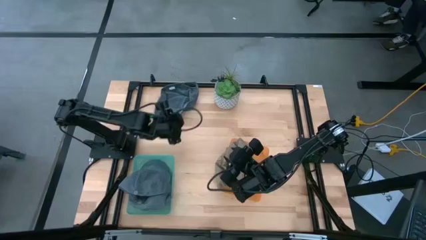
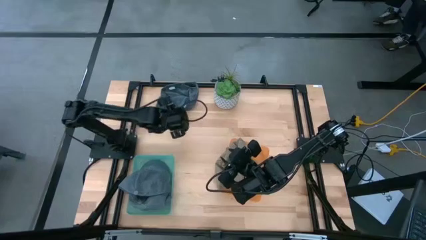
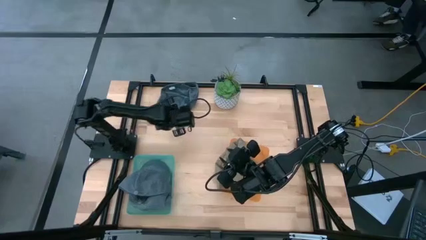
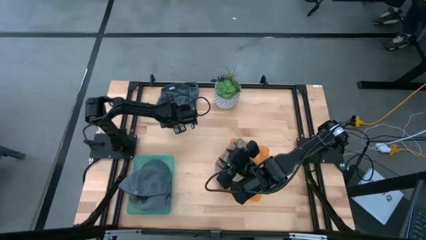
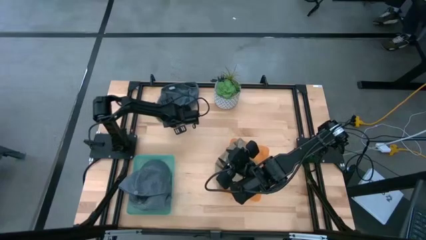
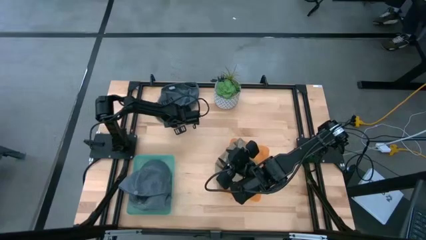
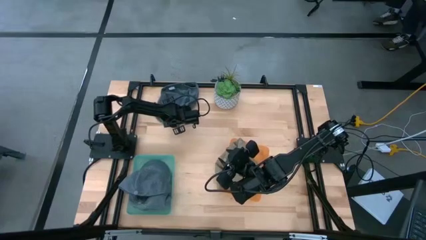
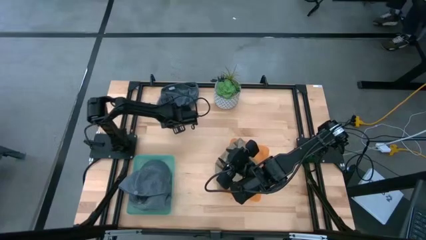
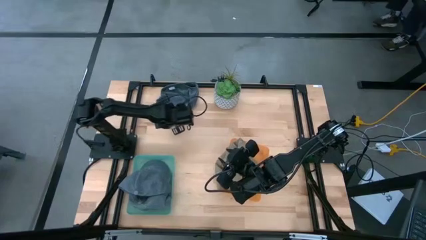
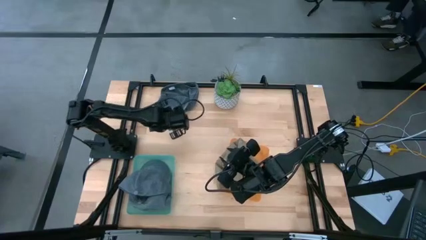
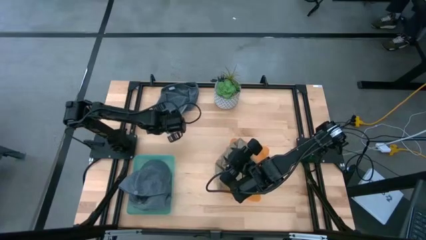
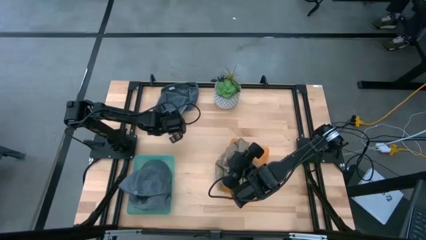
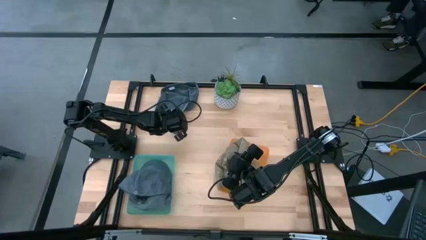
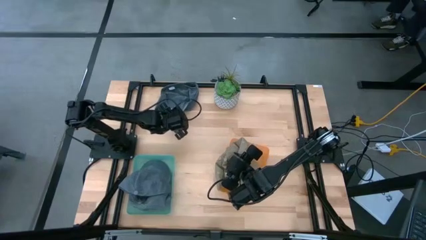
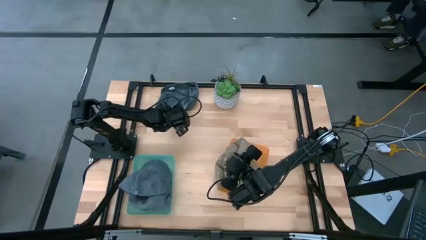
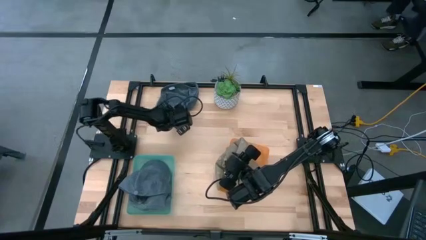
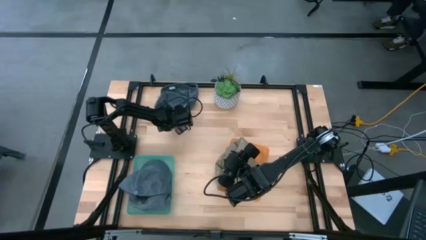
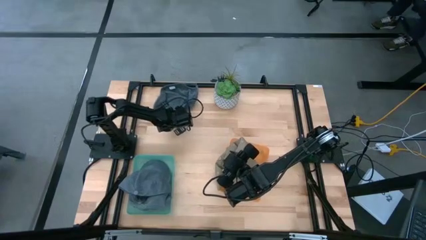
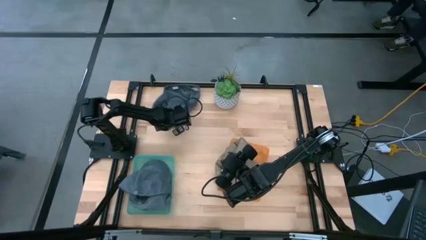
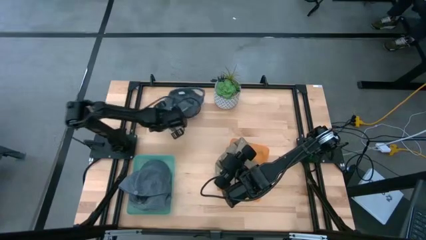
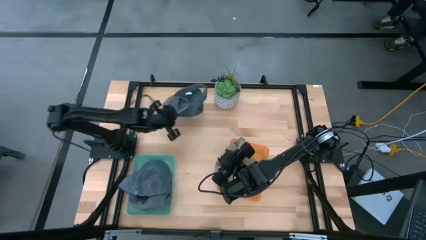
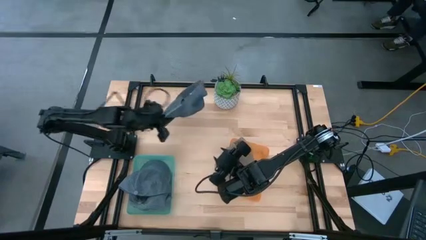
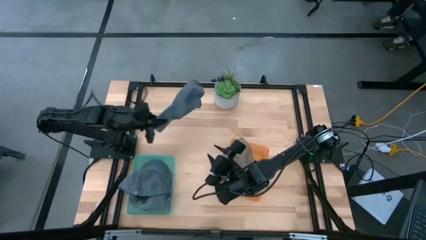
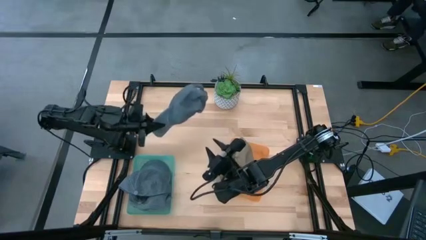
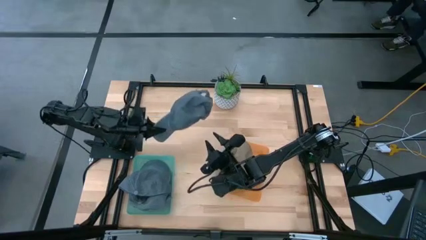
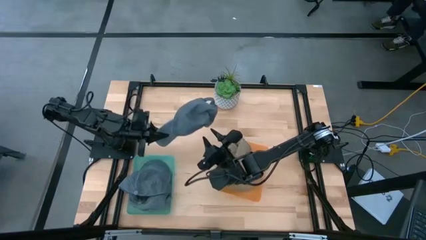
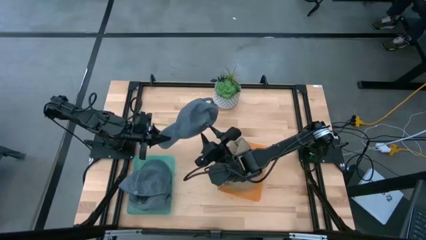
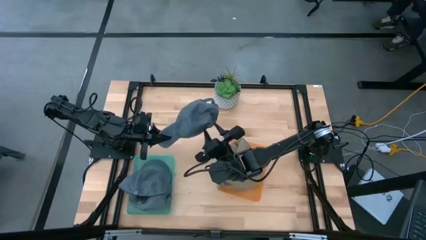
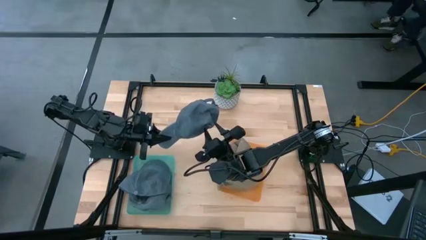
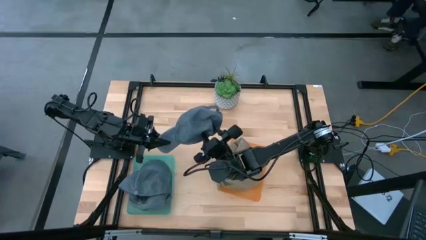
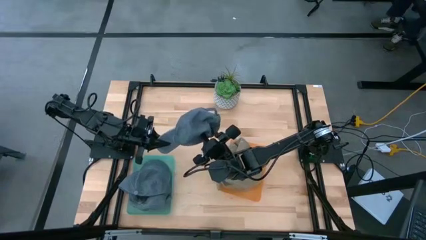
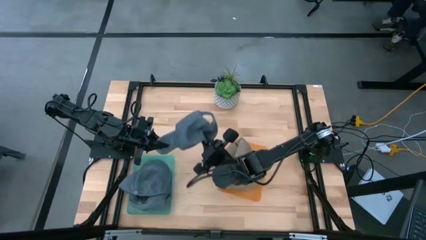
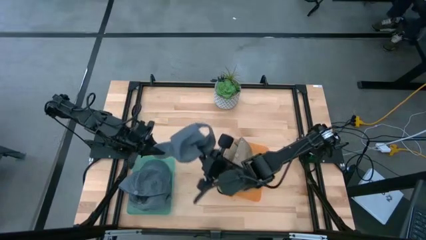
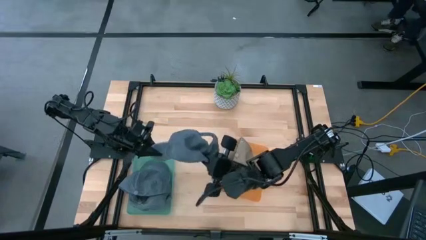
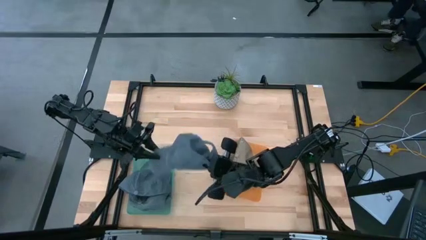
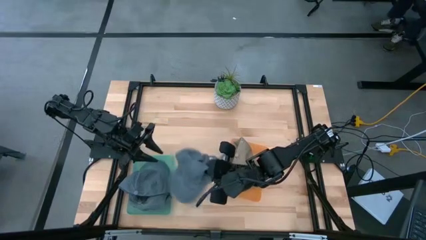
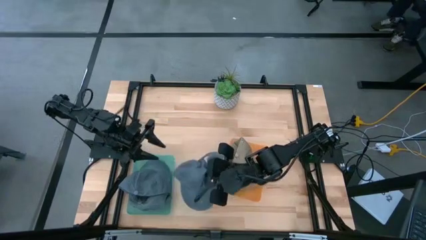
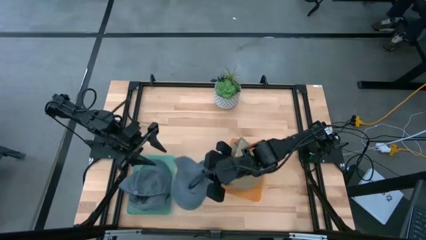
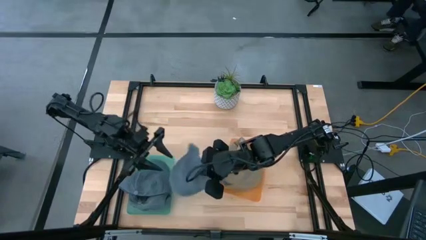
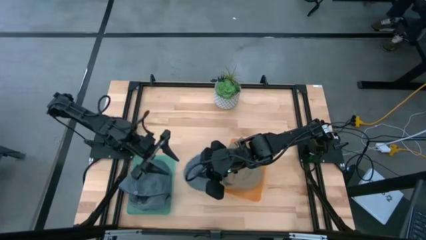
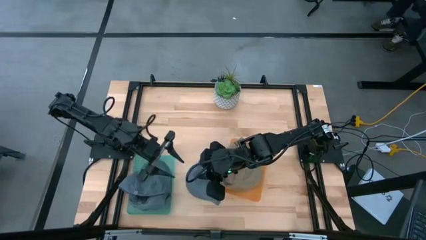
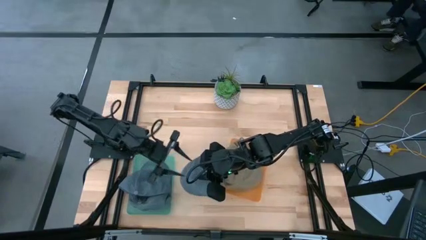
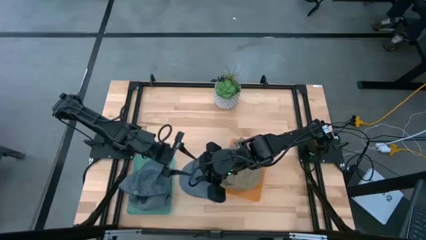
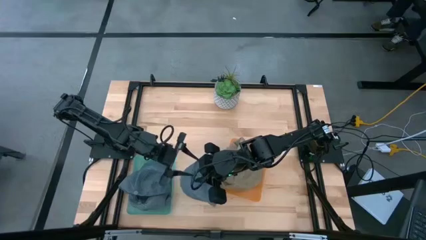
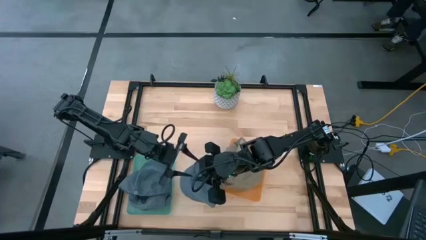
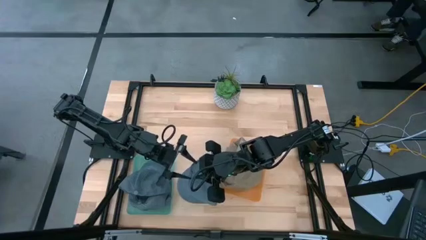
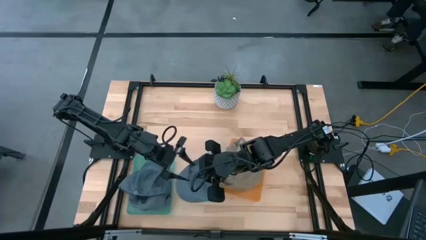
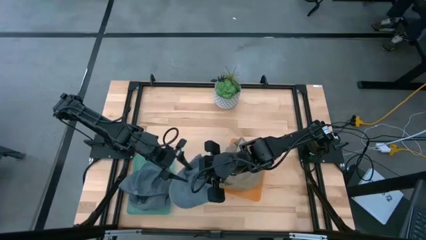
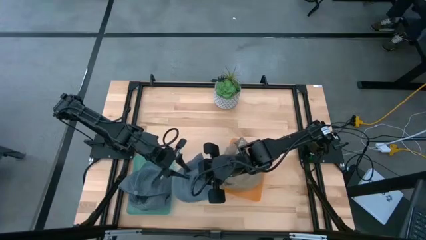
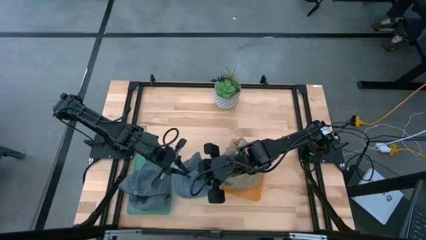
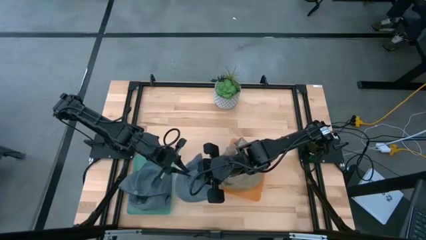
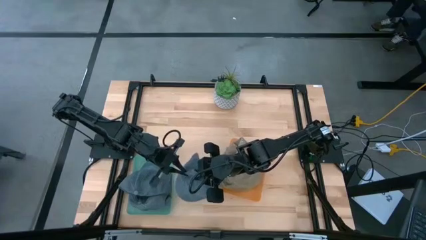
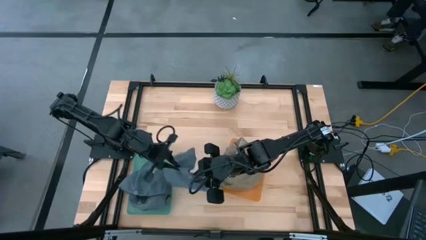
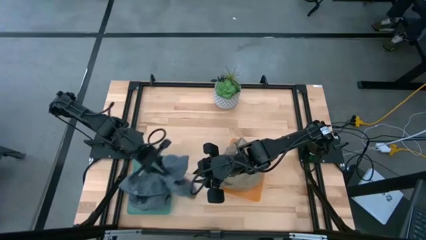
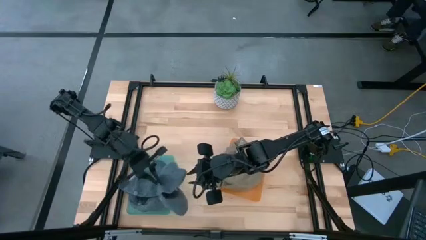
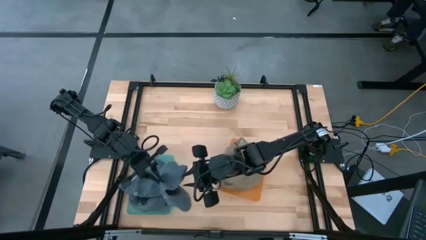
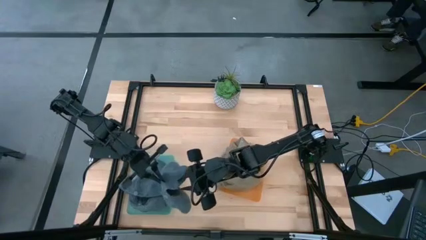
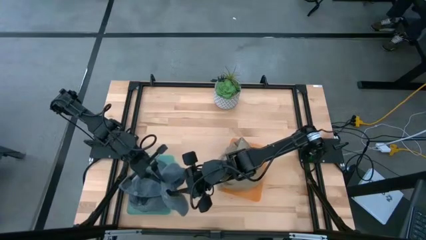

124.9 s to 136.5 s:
Task: Pick & Place hat
Put the blue cap into the green bin

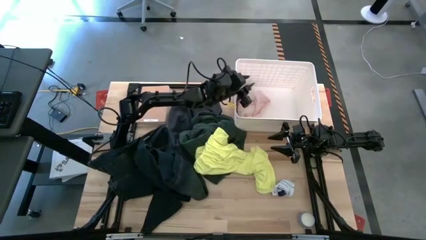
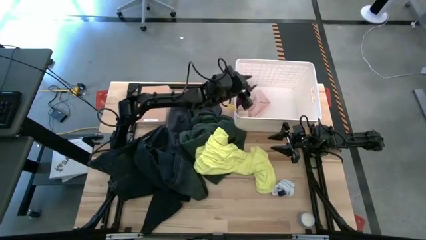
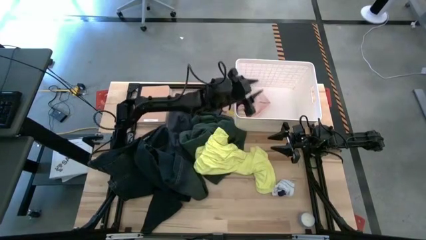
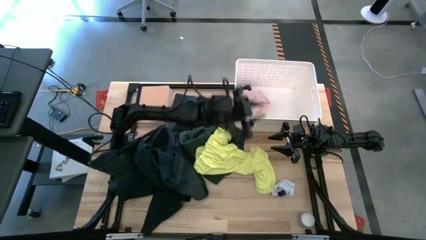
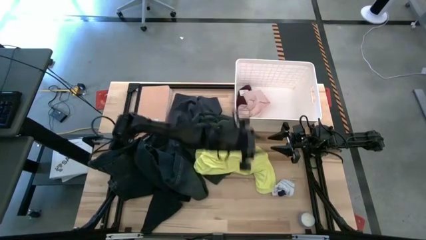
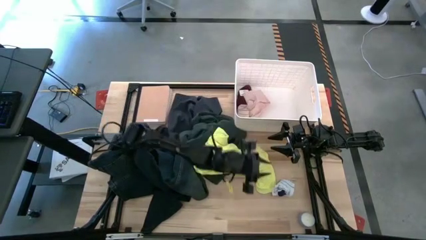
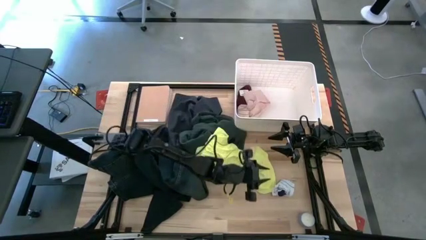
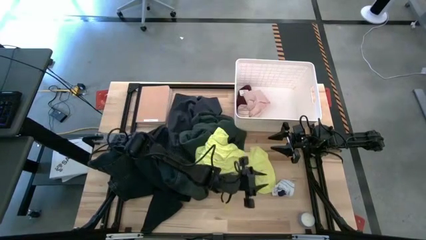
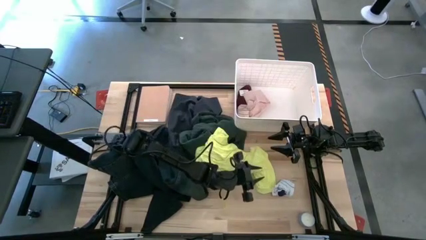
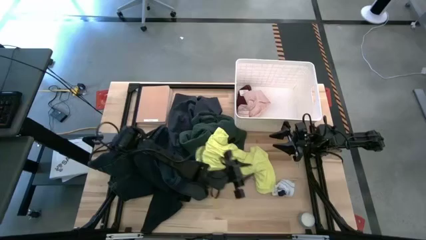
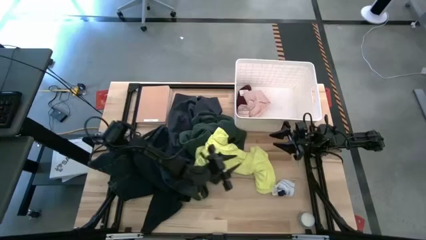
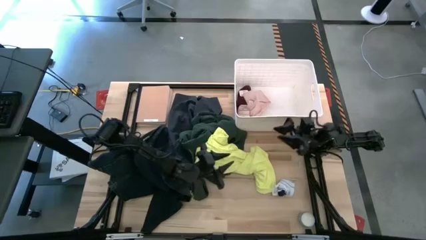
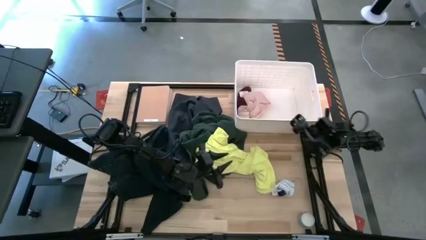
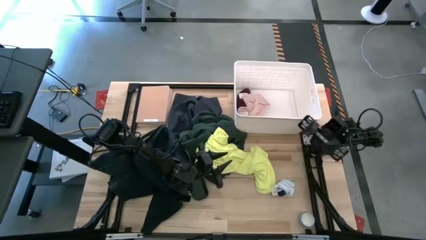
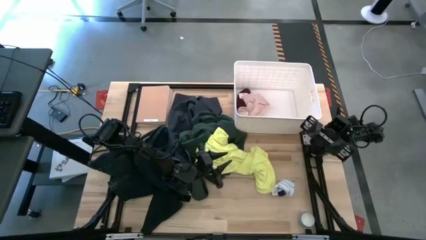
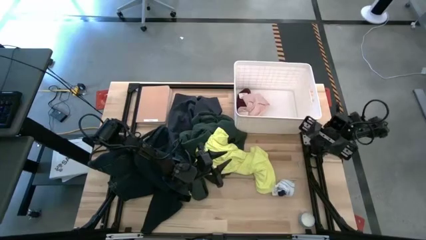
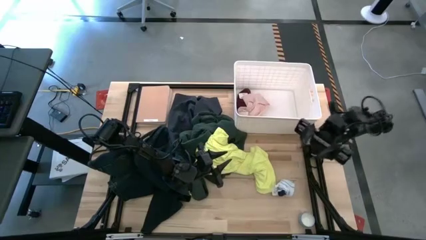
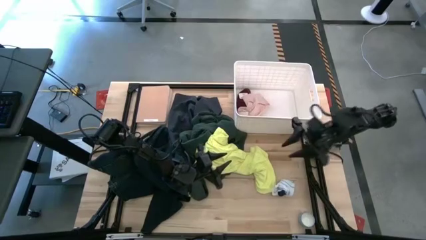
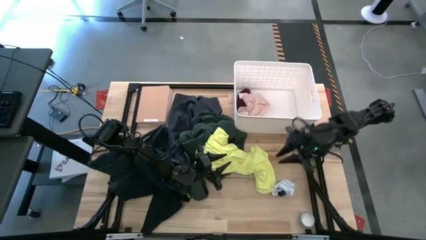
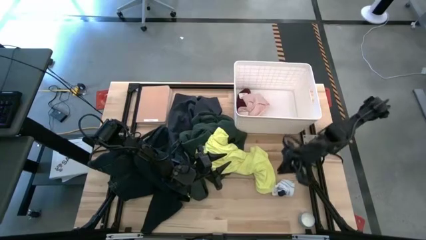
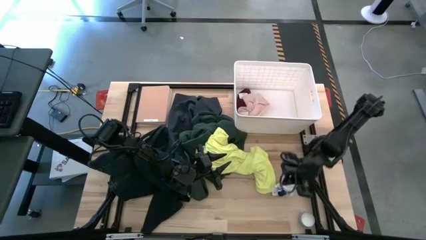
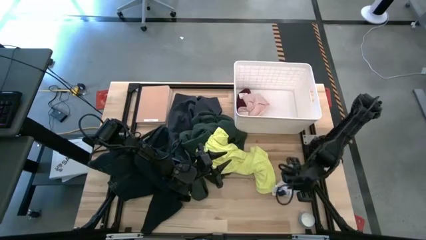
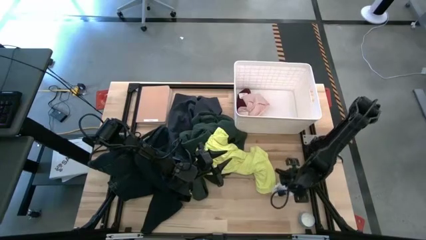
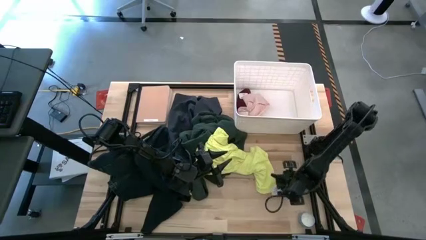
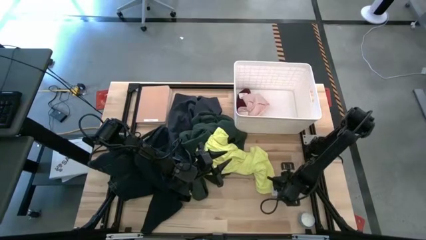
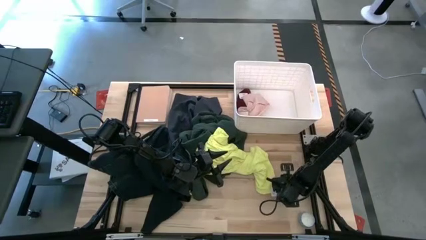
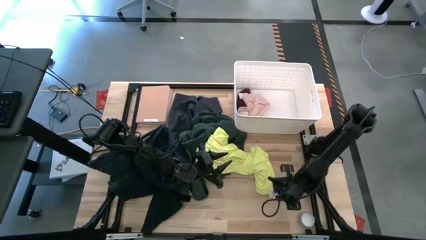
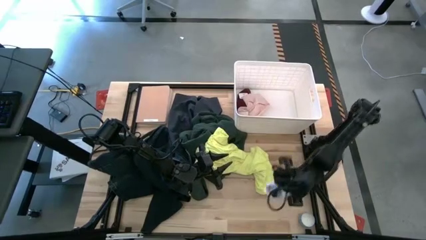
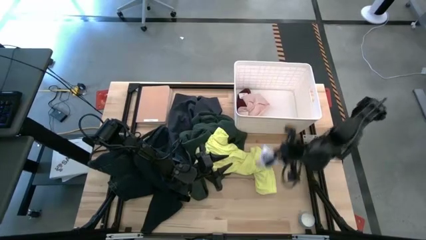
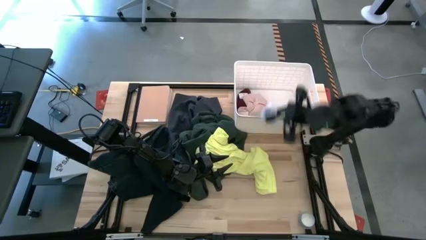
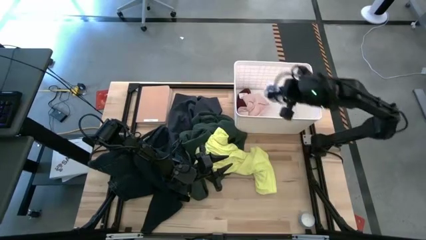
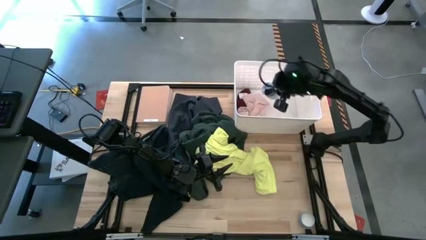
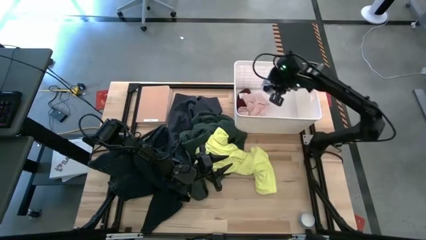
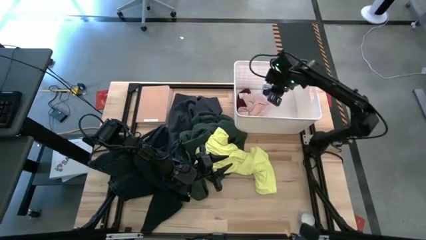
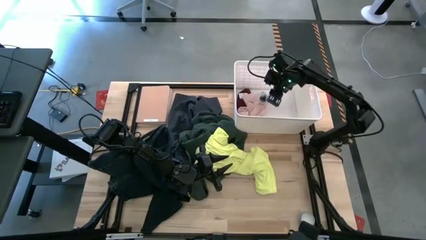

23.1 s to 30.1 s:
Task: Sort clothes
Put the white and blue socks into the white laundry bin
